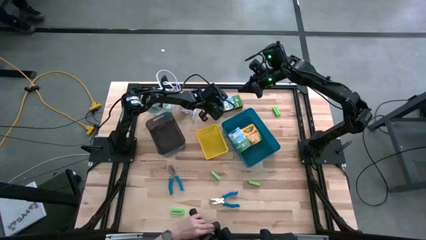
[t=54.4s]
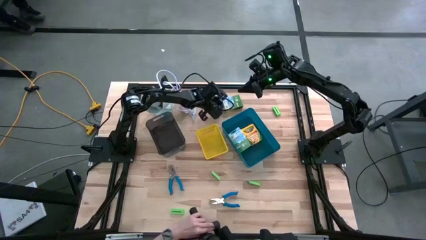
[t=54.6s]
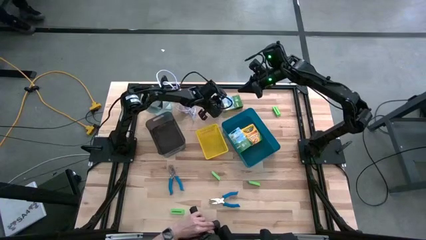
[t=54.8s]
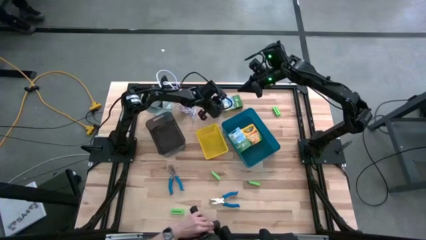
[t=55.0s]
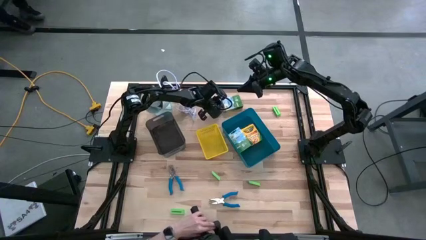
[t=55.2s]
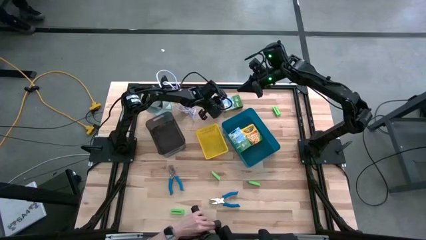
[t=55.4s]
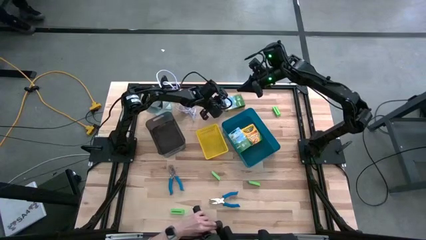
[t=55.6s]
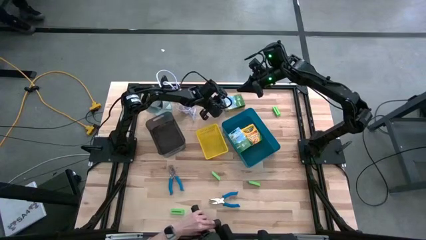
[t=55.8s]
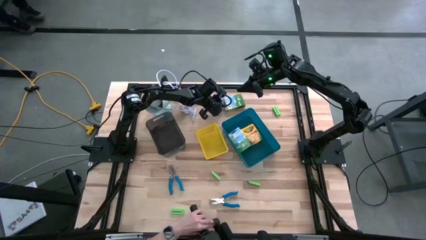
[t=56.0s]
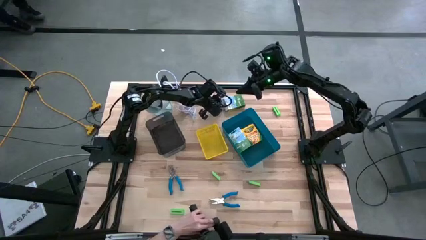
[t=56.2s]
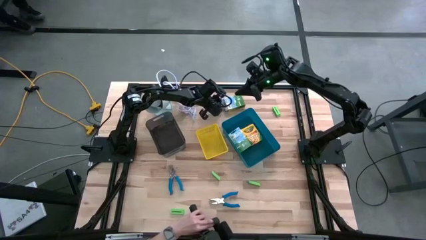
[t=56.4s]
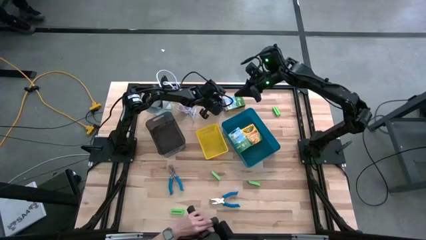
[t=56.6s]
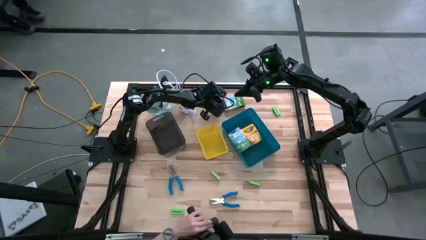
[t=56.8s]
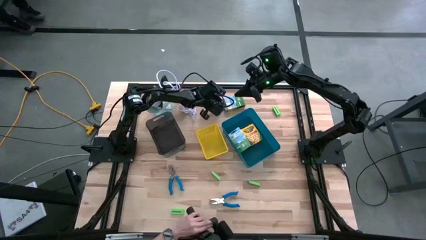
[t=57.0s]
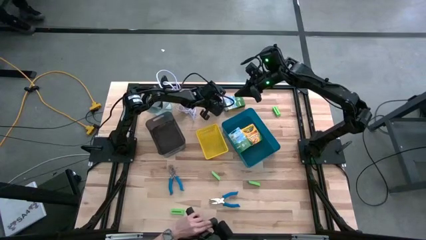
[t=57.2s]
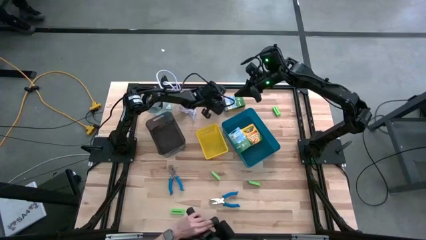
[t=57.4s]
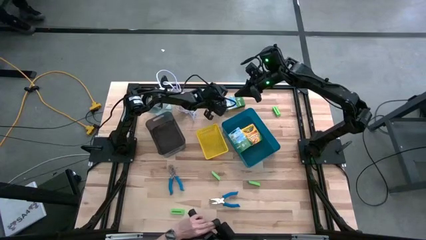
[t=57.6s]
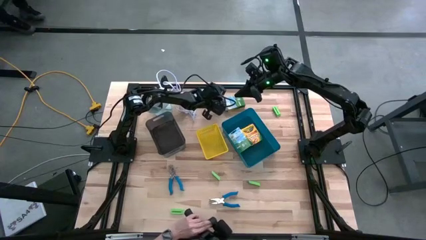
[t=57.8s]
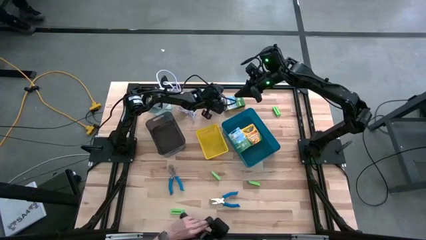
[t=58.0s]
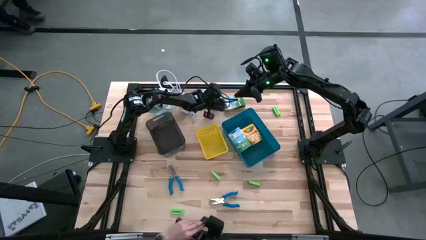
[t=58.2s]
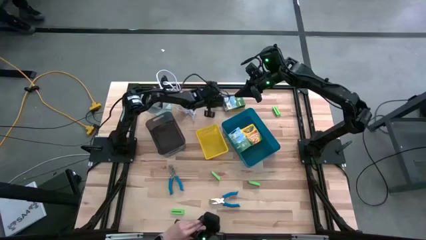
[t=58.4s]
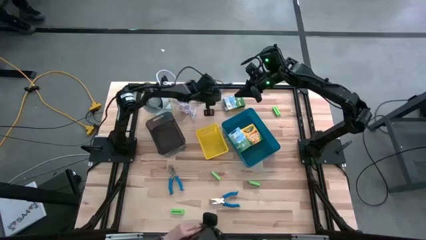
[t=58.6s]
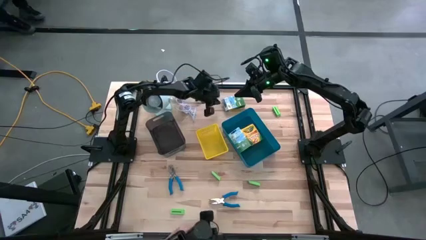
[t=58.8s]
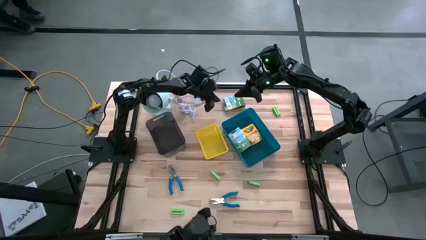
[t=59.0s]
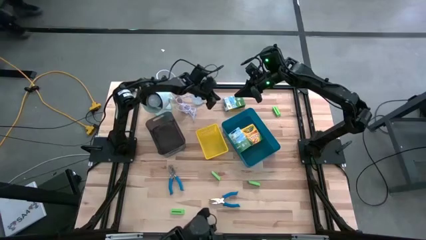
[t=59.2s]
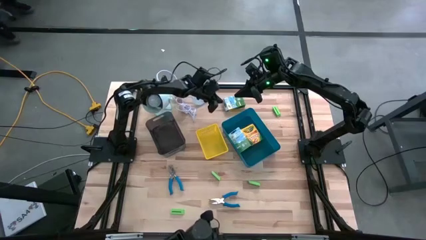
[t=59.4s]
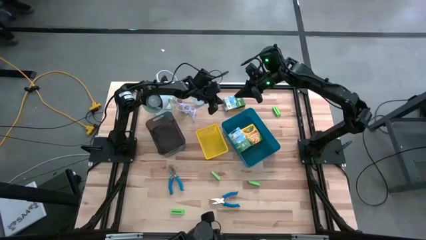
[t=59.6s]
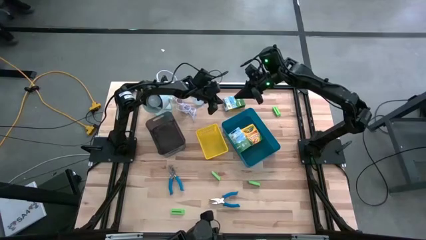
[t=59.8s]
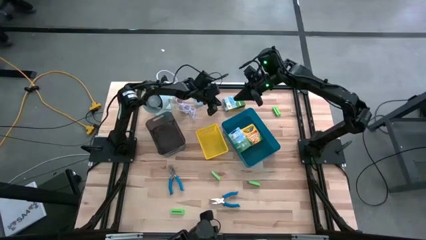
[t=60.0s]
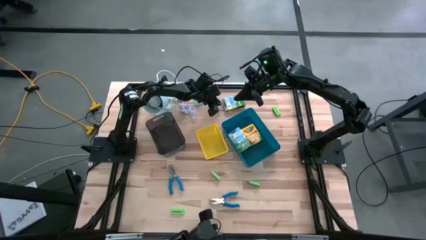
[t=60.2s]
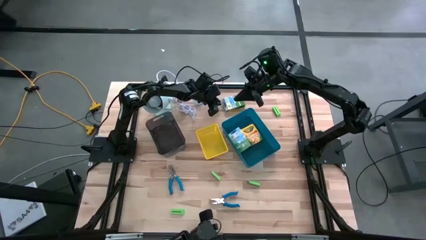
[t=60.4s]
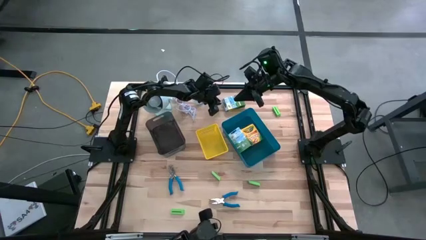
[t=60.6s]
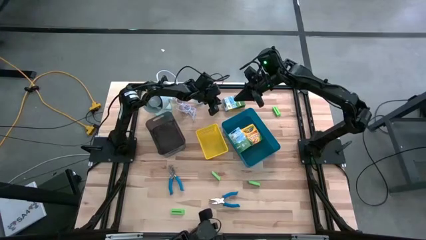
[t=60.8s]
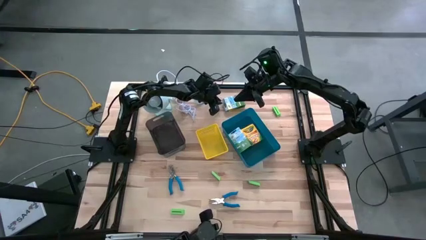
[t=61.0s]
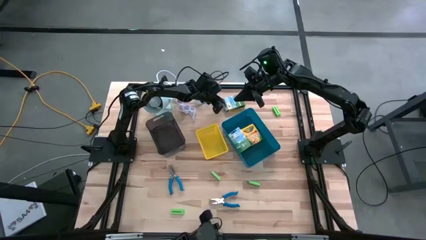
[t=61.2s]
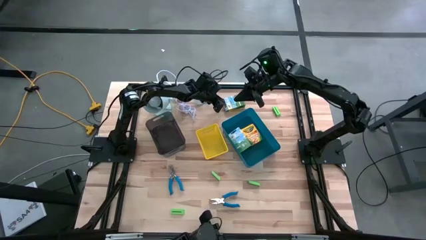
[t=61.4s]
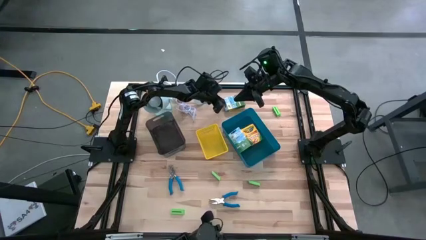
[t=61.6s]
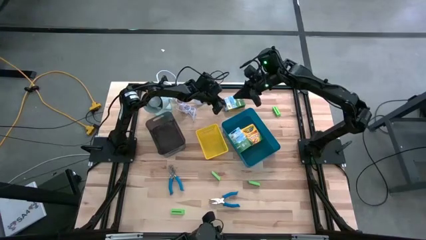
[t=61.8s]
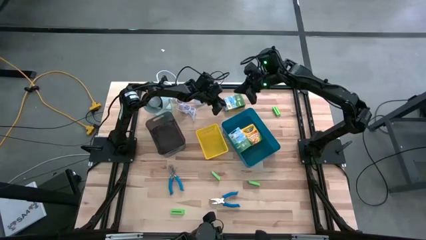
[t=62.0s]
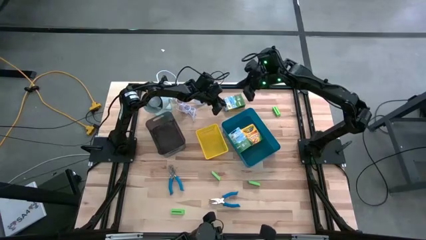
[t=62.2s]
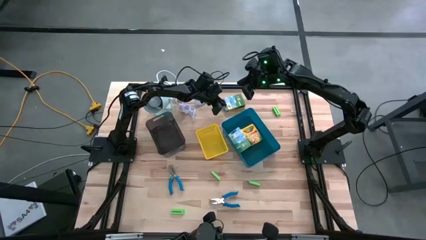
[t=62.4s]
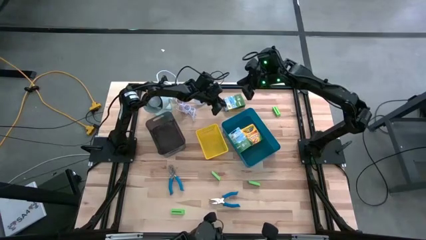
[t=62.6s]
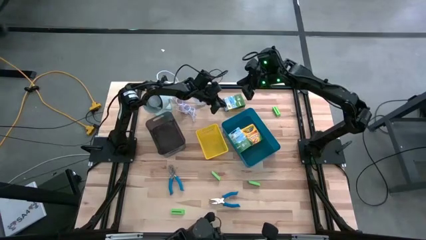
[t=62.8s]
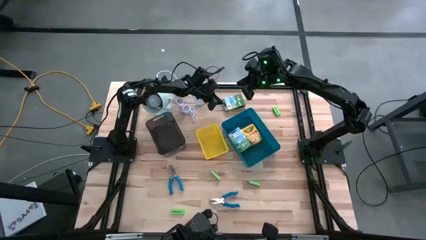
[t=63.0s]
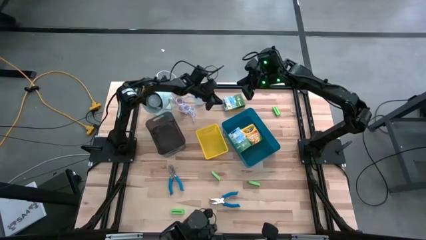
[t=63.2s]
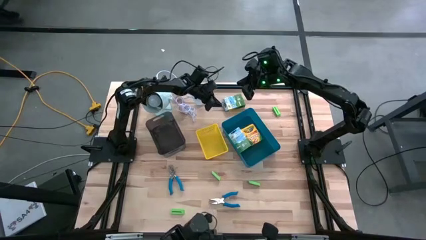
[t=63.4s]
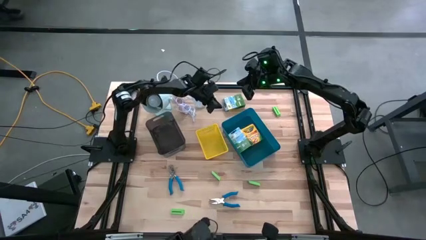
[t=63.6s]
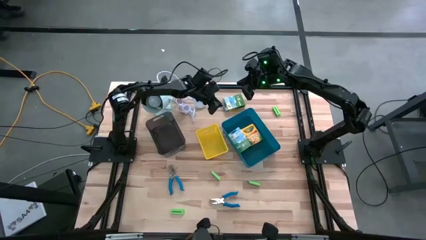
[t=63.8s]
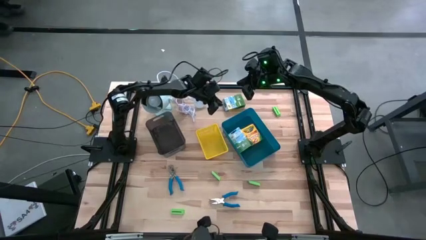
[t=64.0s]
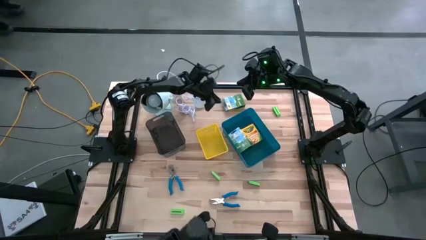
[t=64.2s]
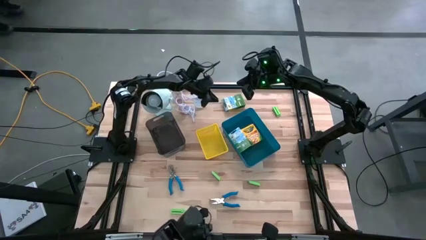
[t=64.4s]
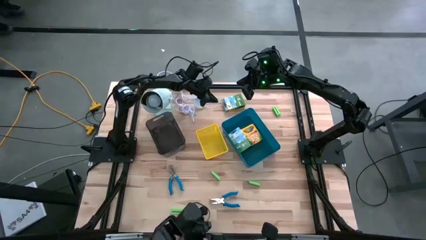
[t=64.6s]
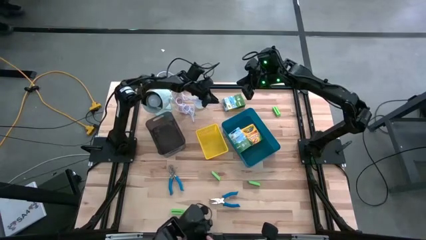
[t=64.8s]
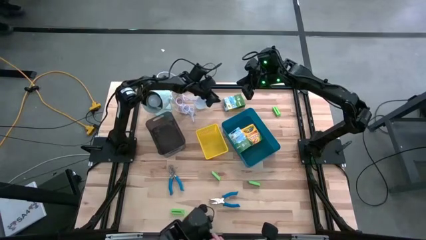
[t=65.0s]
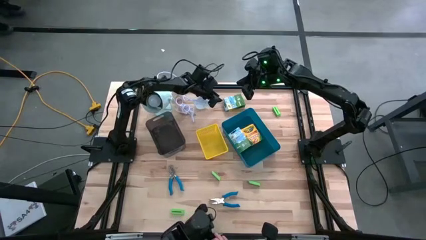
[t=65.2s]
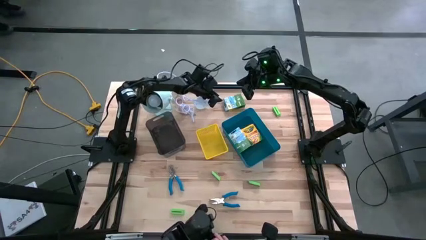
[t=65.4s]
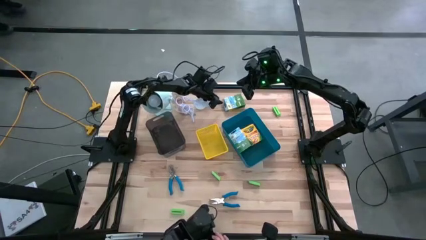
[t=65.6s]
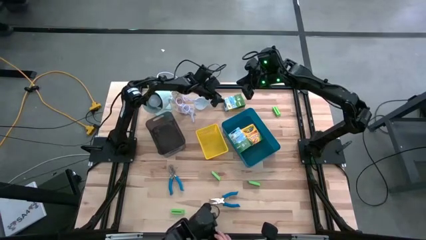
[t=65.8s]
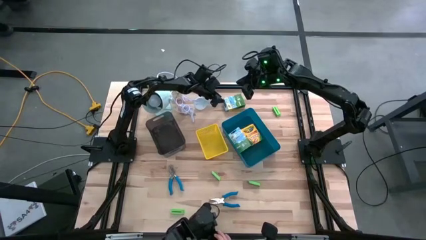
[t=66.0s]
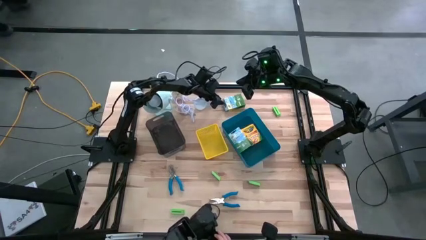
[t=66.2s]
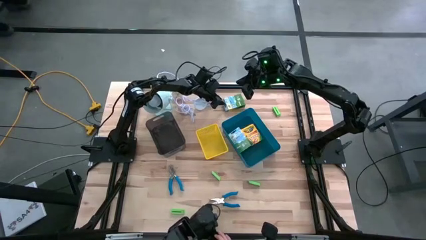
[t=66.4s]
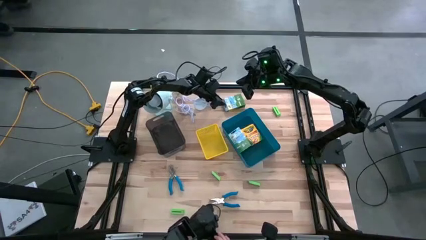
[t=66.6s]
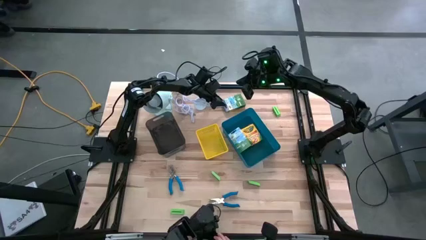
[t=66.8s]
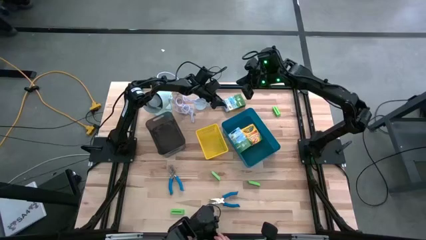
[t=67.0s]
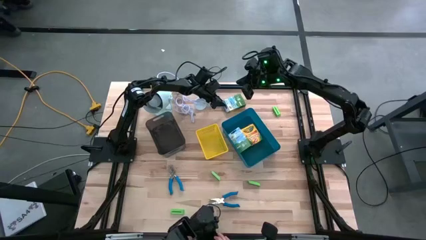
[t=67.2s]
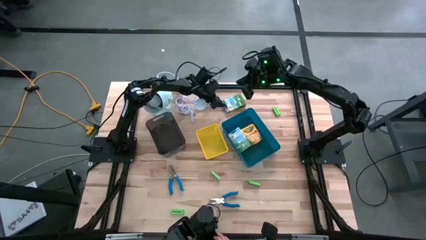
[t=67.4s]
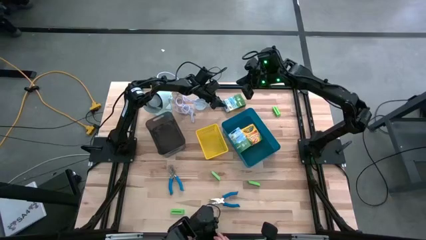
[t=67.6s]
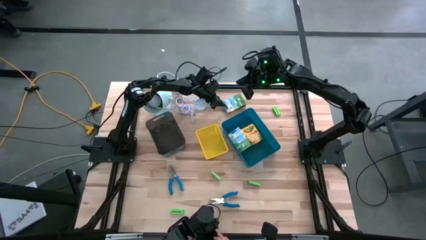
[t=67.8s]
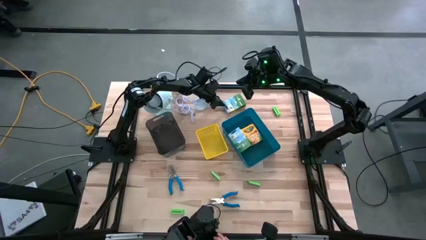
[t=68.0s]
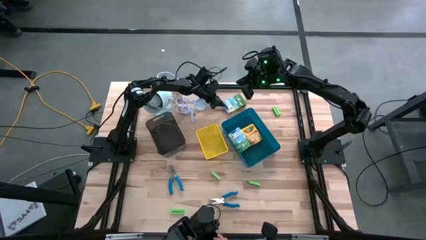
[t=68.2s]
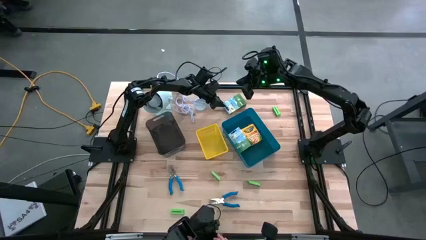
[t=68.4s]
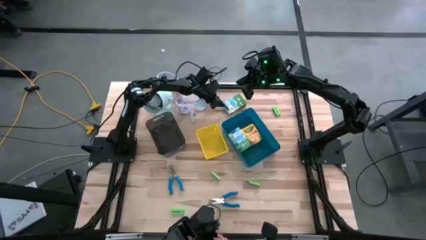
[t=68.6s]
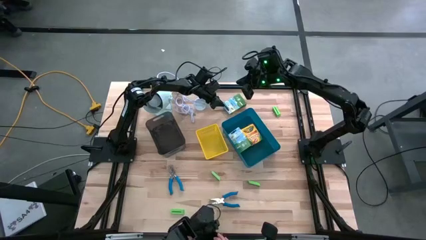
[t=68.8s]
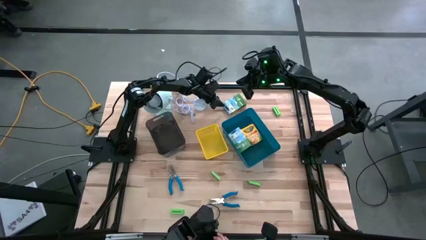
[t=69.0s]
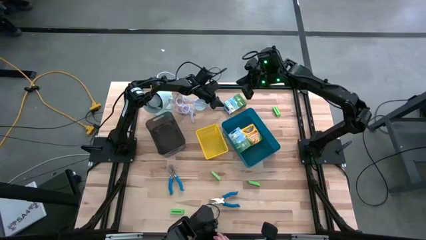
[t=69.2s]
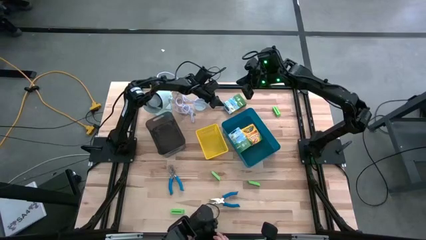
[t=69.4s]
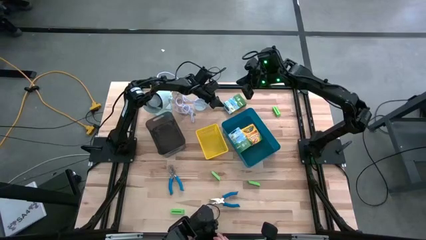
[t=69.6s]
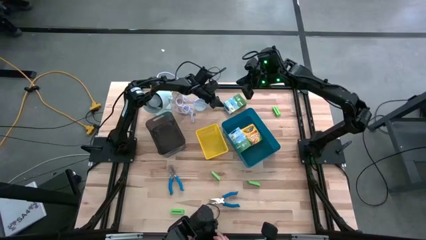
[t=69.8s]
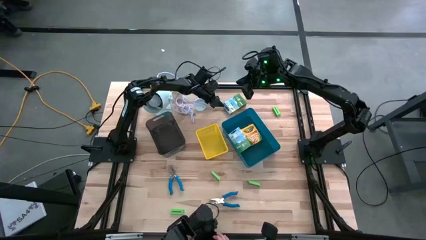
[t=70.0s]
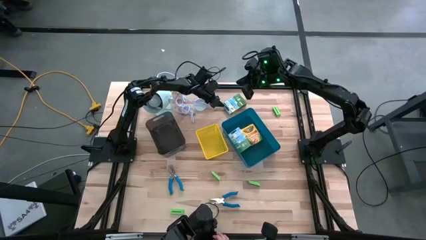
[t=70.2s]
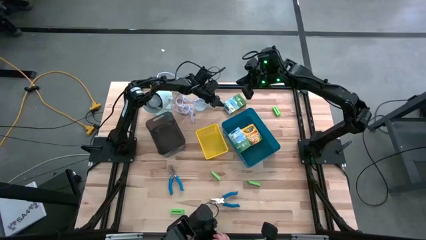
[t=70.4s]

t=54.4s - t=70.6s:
Task: Pick & Place School Supplies
Put the crayons box into the blue bin
